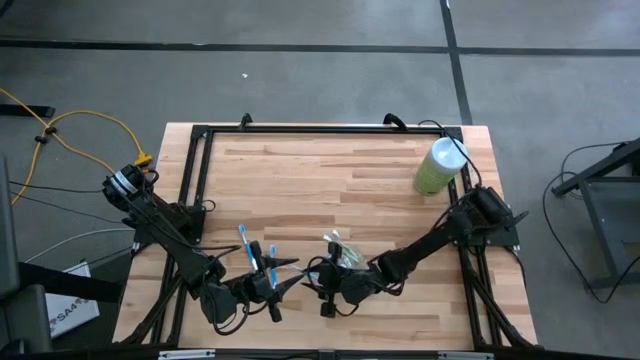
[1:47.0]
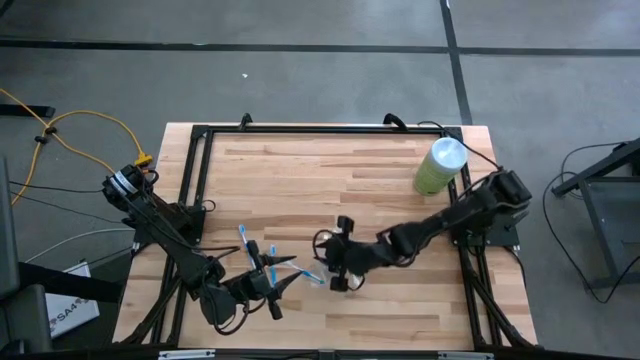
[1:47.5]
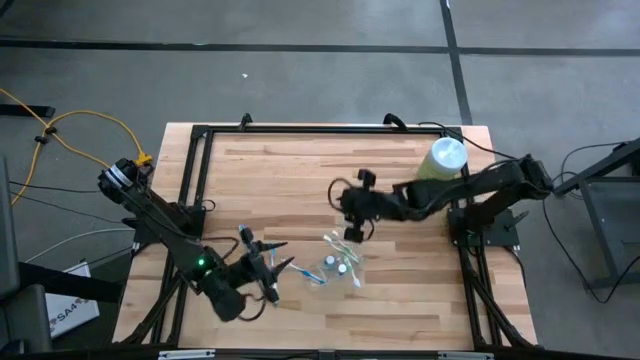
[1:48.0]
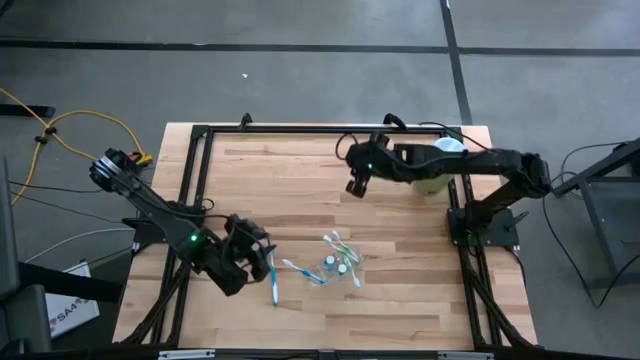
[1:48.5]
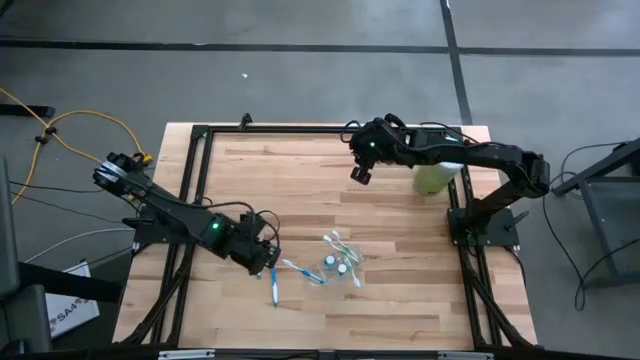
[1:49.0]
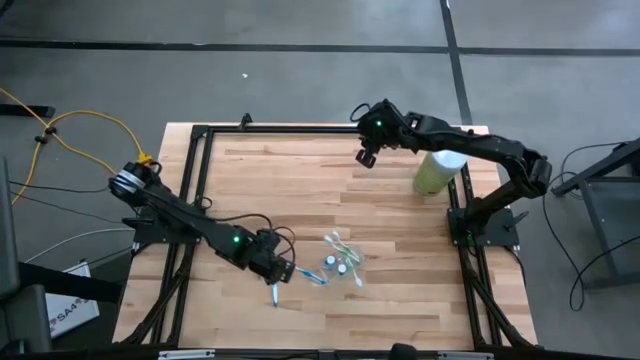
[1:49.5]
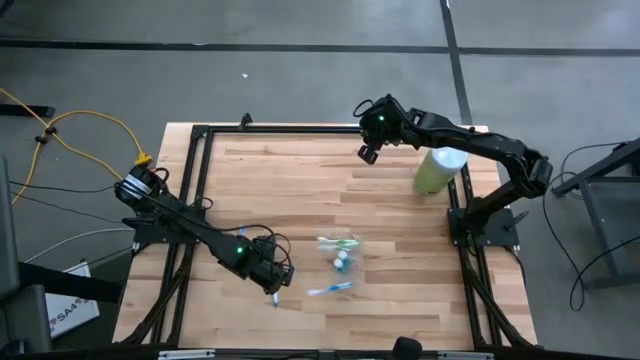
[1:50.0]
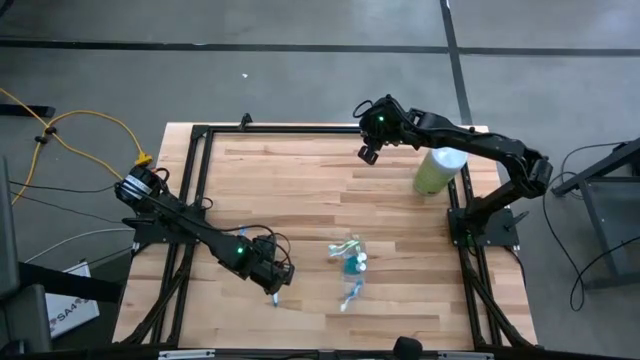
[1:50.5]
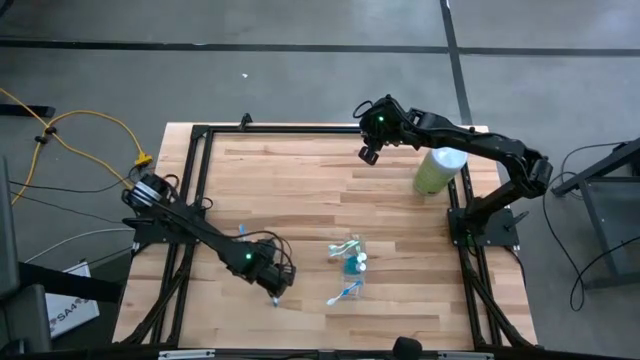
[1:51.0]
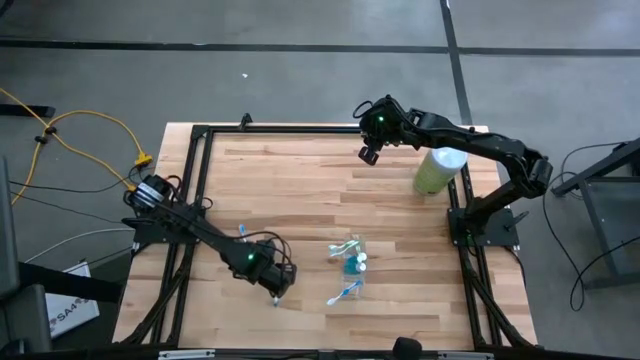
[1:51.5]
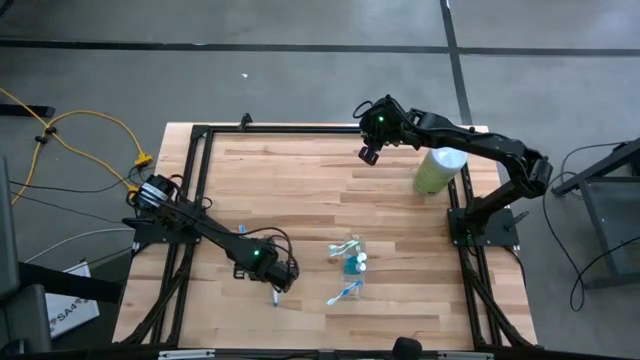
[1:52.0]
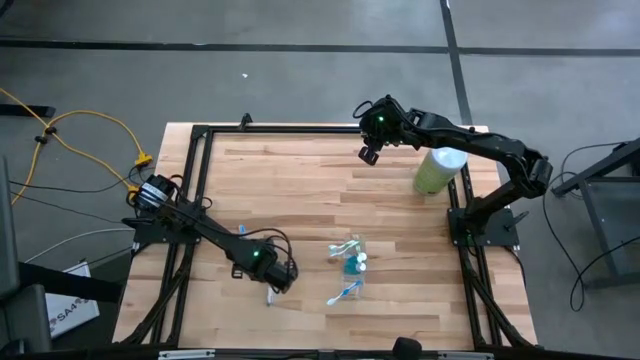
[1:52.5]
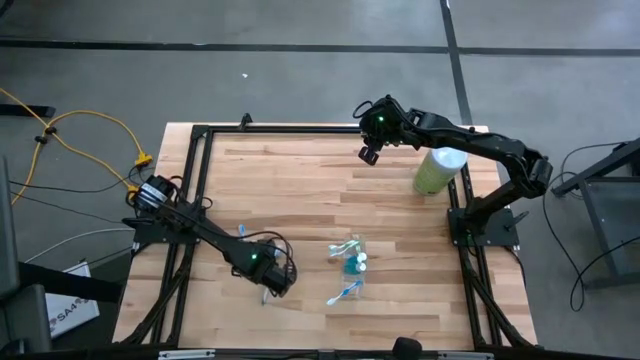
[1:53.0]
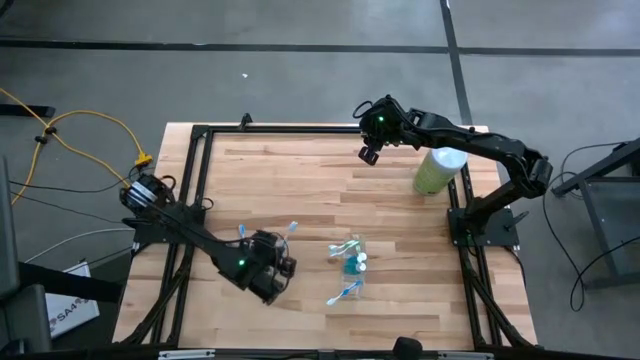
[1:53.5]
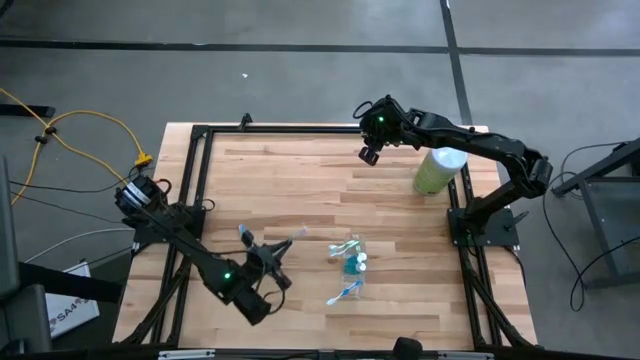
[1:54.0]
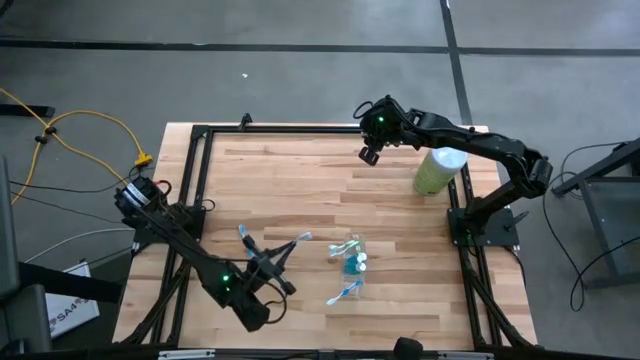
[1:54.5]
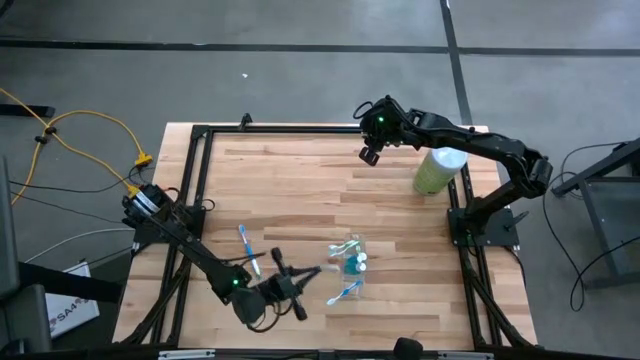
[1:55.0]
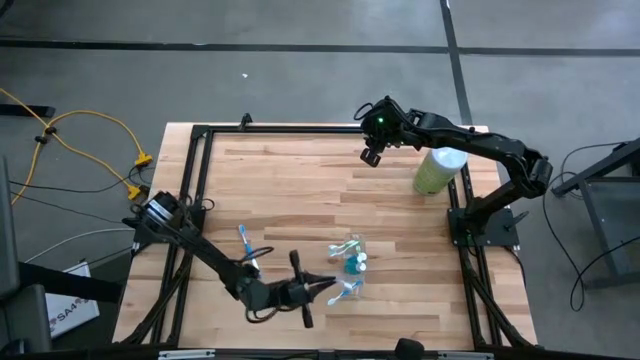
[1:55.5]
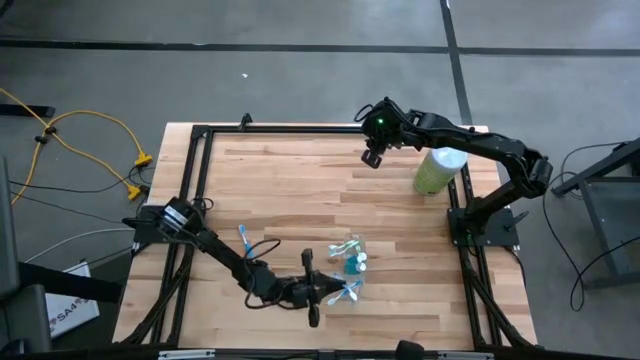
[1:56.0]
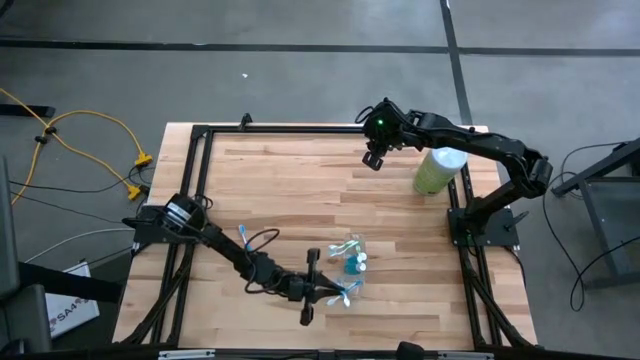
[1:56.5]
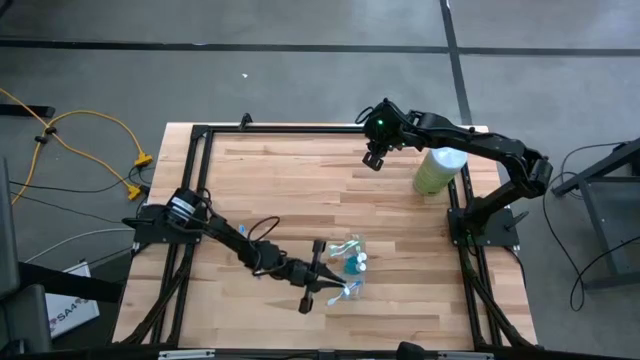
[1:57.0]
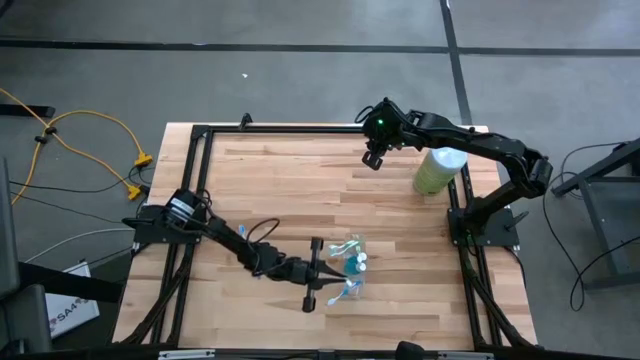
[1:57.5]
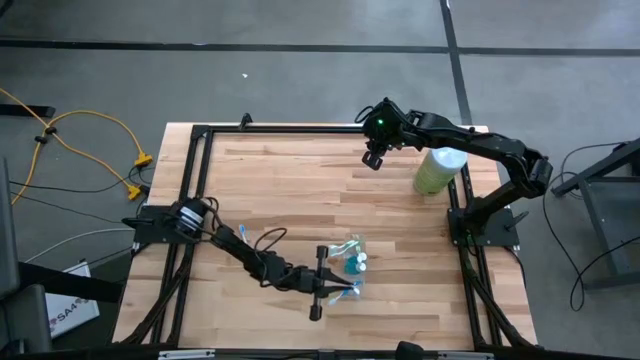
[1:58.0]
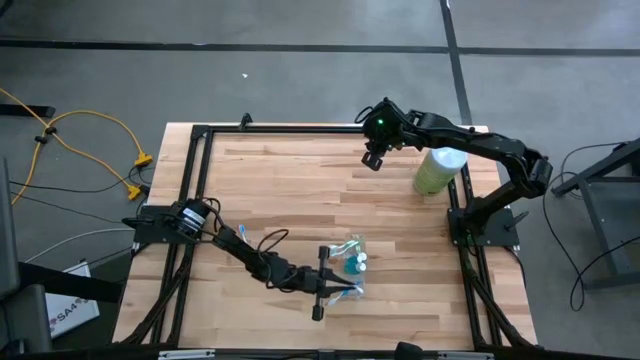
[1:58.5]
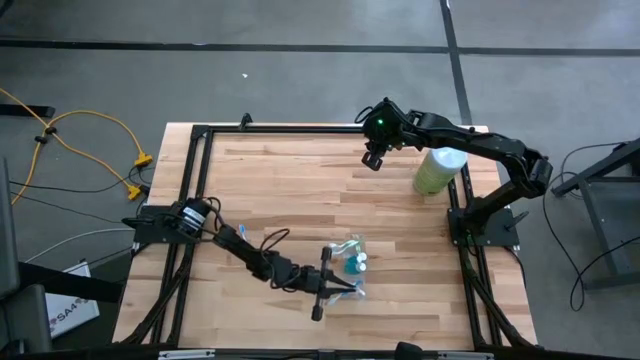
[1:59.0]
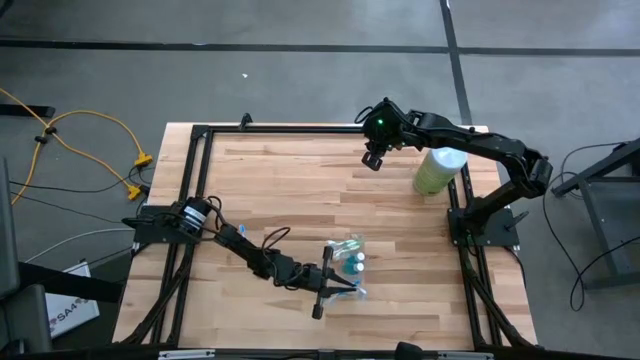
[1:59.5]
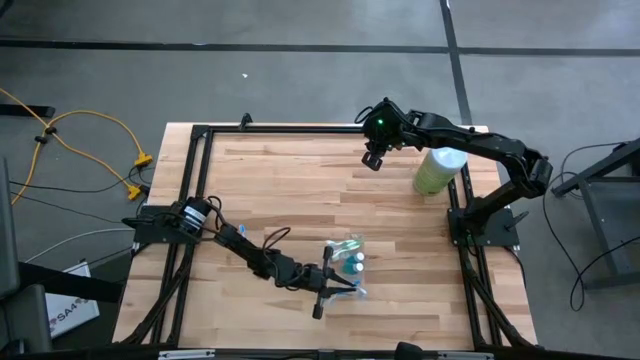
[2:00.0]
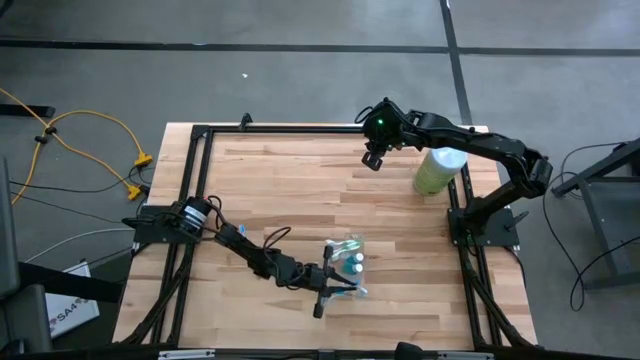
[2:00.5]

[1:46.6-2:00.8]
Task: Pick & Place toothbrushing station
Put the bottom blue toothbrush into the transparent organizer
